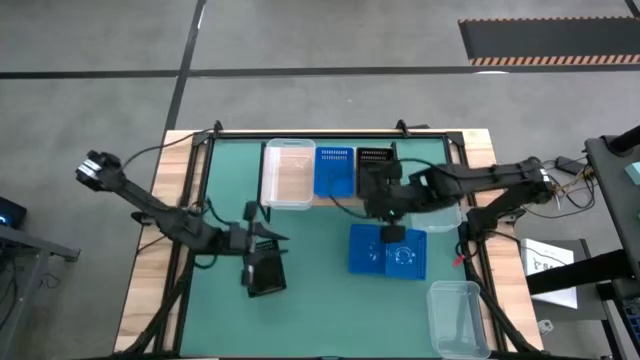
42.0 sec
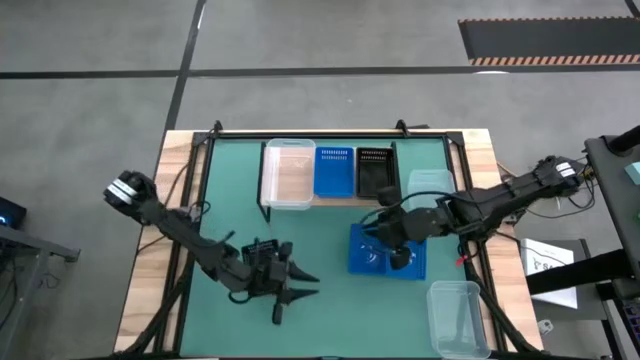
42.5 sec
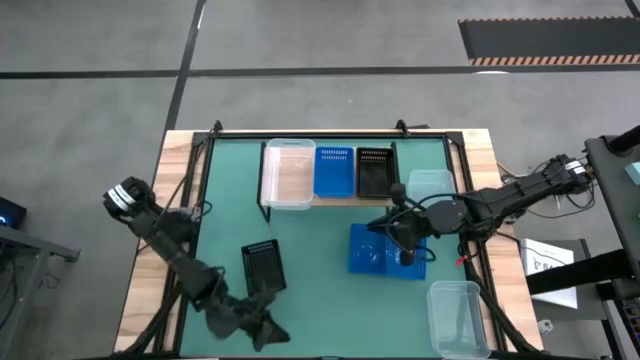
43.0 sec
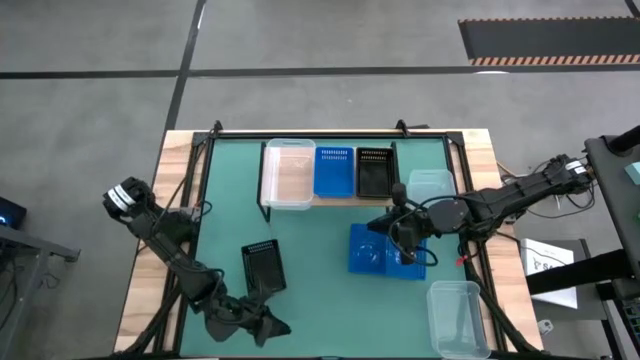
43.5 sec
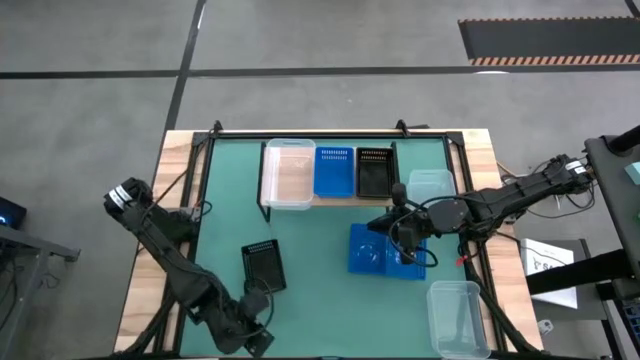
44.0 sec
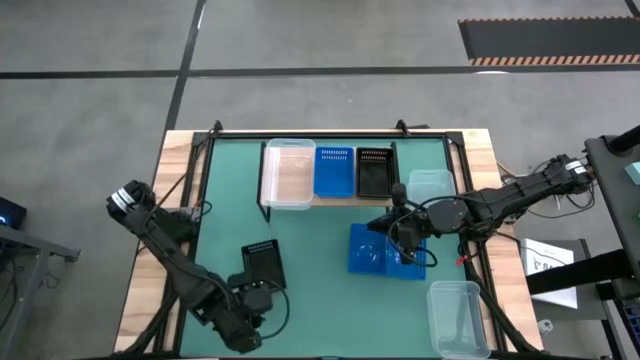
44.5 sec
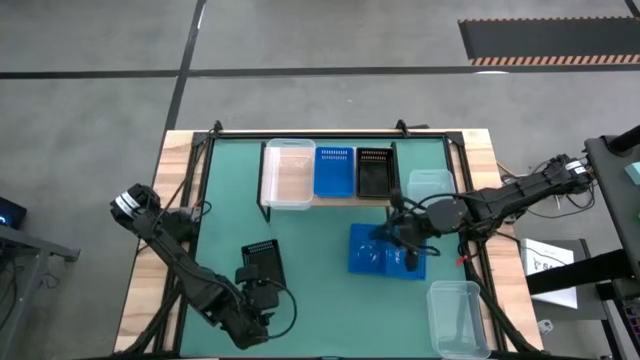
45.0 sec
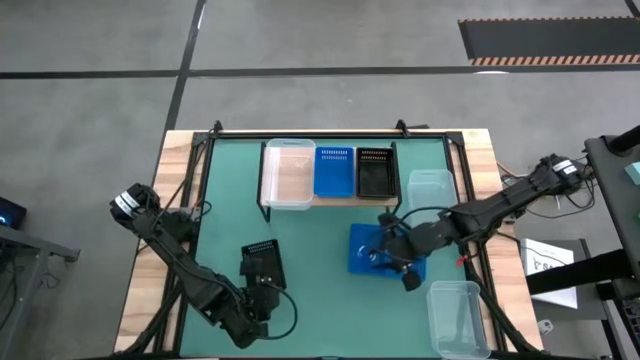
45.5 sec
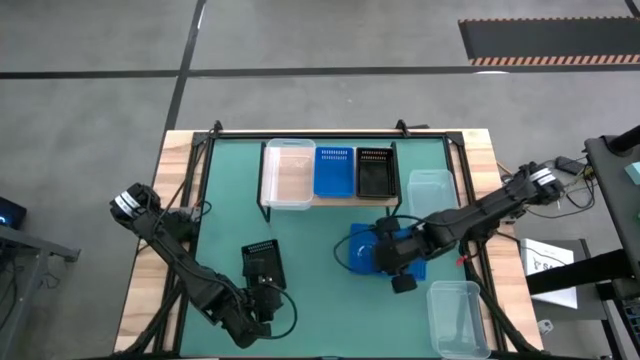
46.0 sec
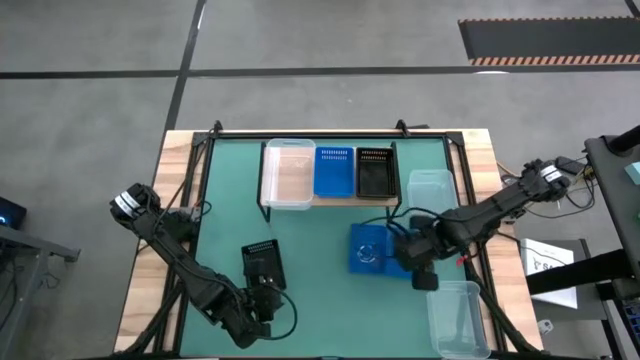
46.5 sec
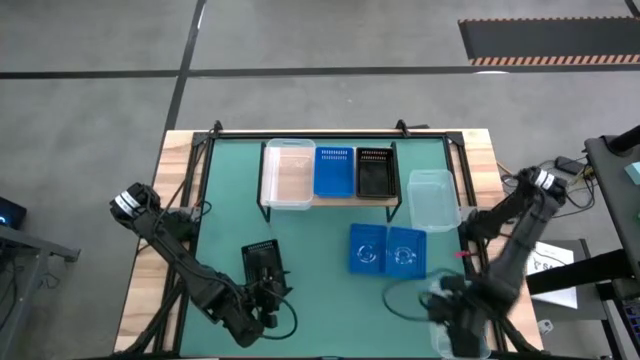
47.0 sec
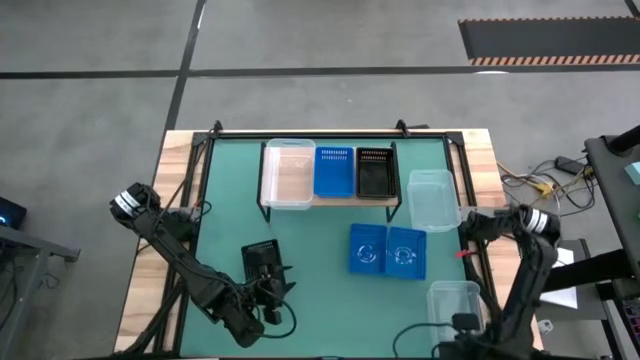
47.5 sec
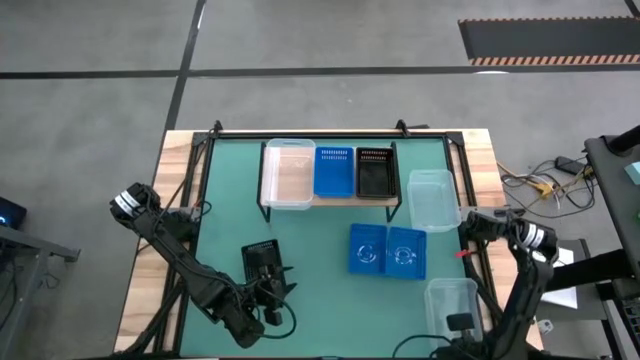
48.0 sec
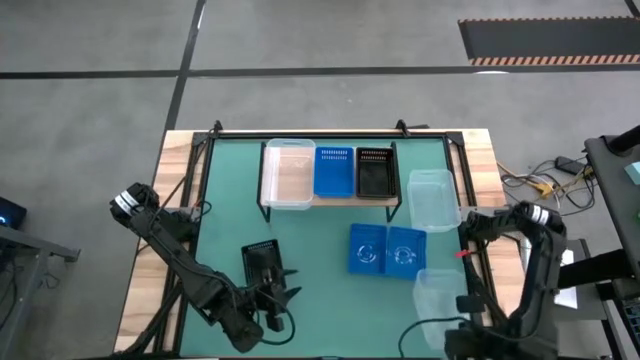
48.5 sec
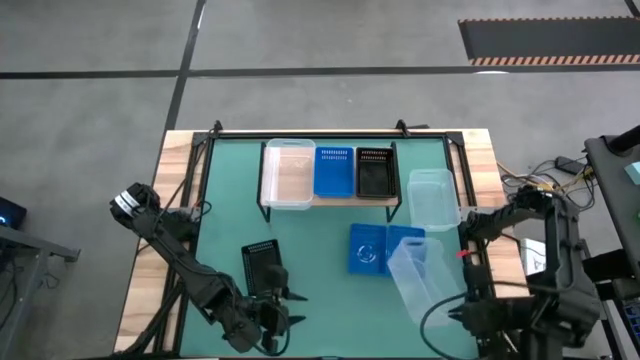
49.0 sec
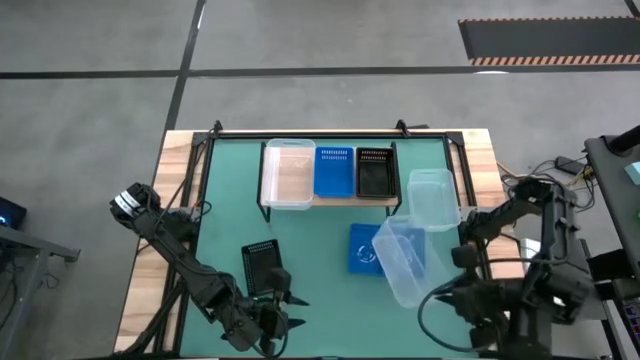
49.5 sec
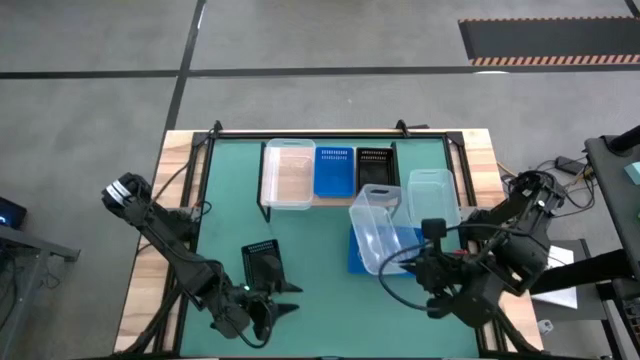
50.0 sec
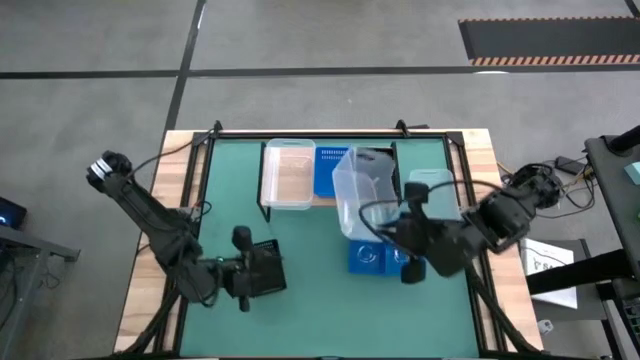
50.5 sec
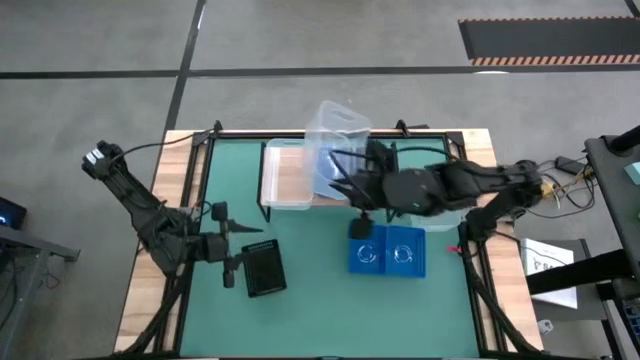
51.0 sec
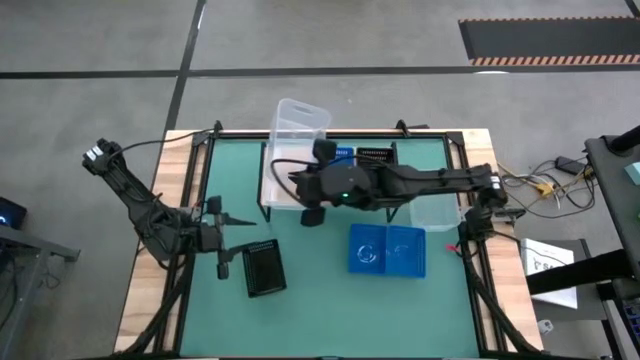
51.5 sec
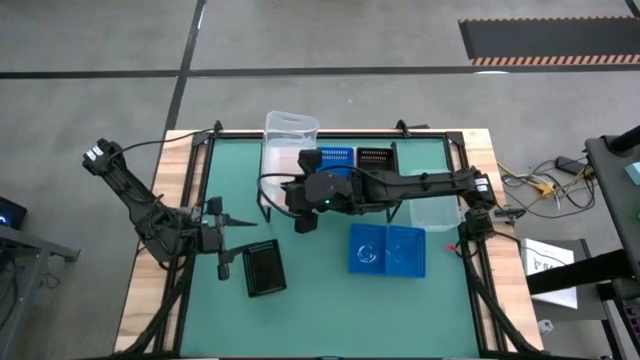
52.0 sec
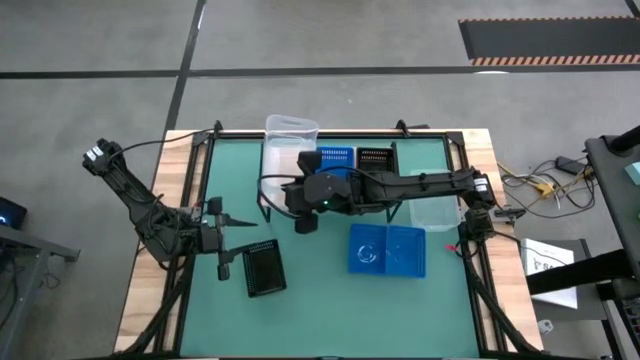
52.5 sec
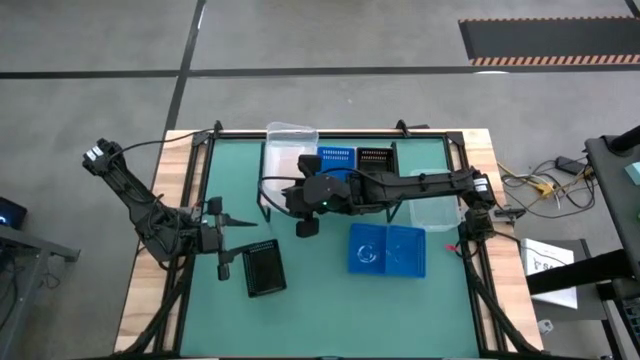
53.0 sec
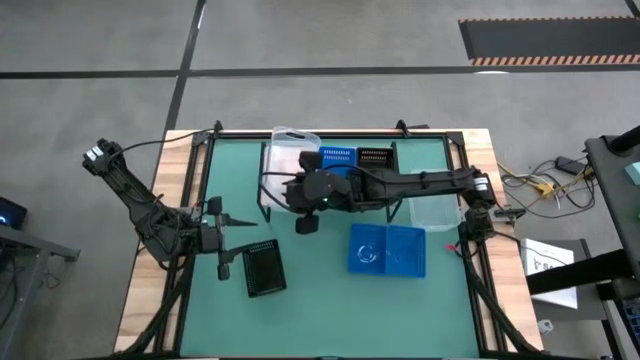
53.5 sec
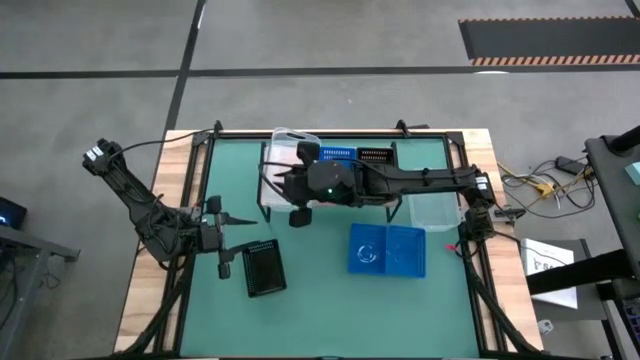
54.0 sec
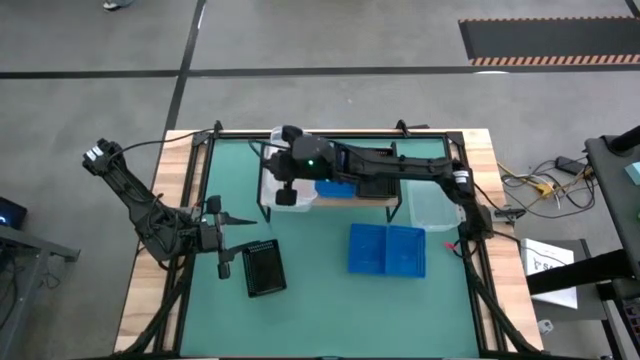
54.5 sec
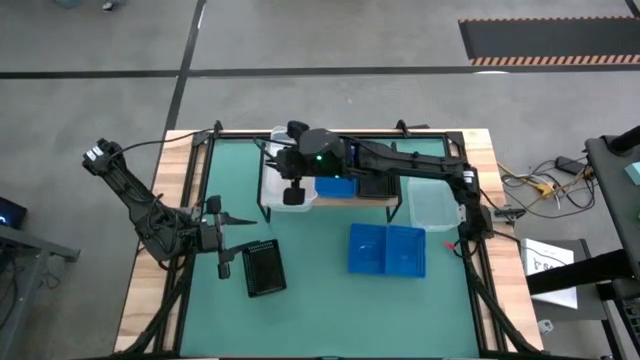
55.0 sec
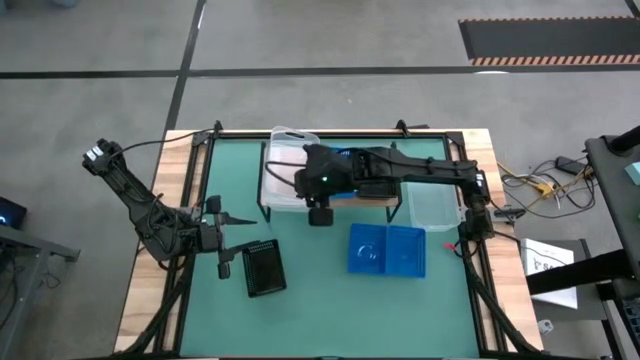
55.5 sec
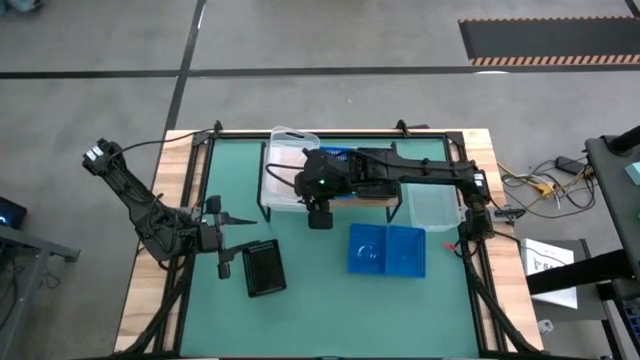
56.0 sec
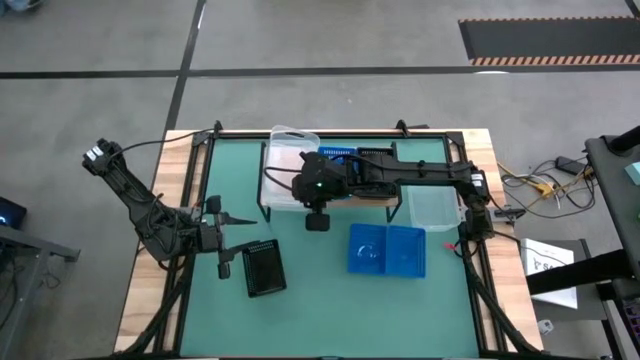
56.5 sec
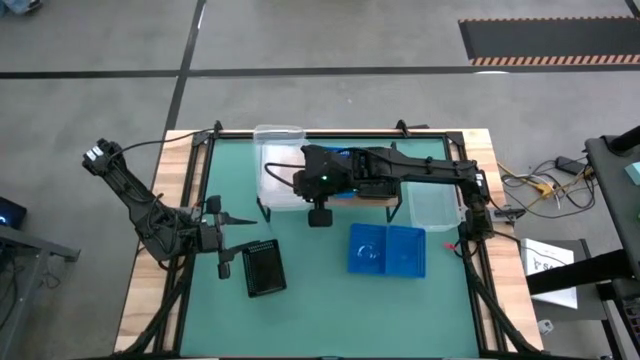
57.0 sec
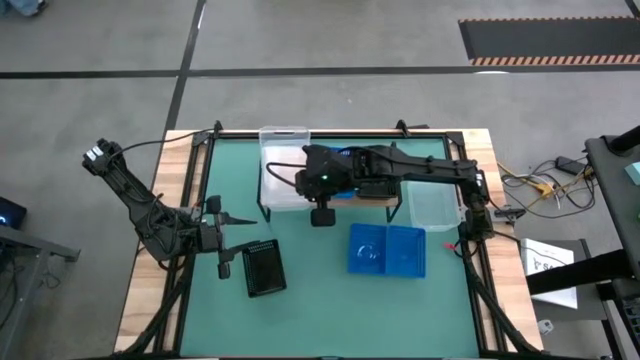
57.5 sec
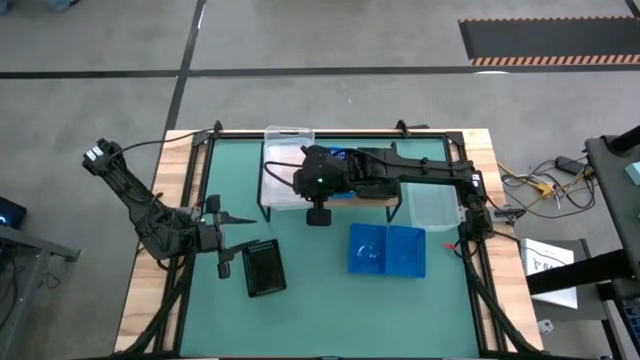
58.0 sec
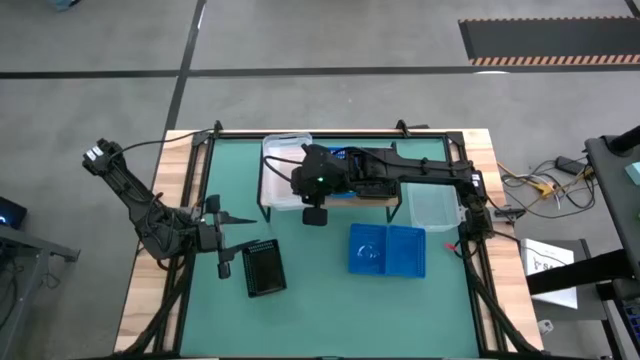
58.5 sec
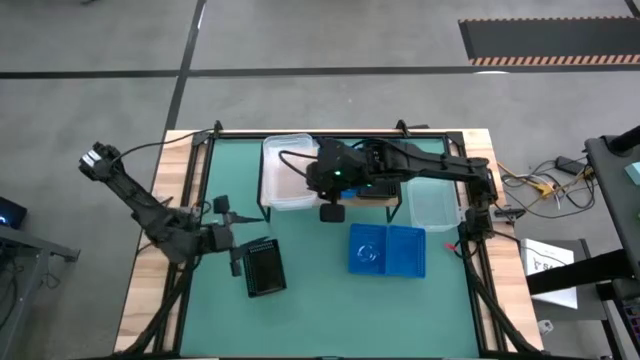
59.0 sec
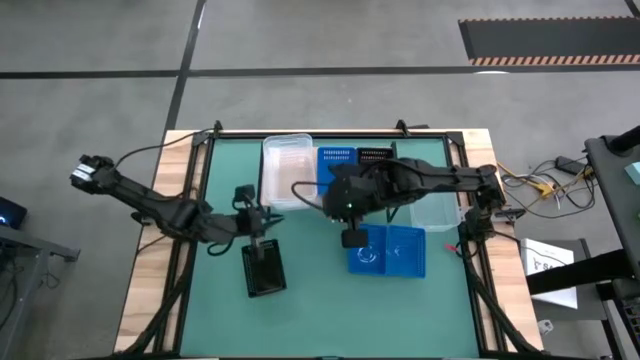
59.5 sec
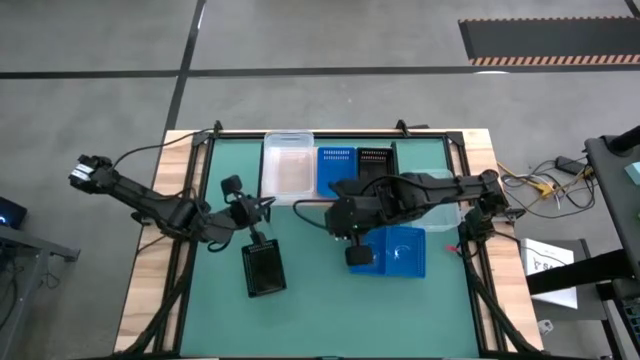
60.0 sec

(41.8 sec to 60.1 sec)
Task: Stack baskets on shelf by color
Stack the bottom transparent bin on top of the transparent bin on the shelf

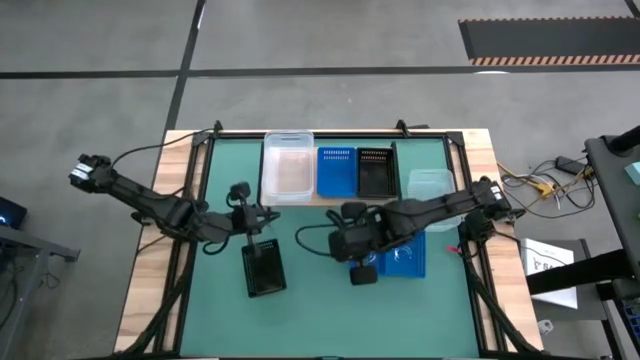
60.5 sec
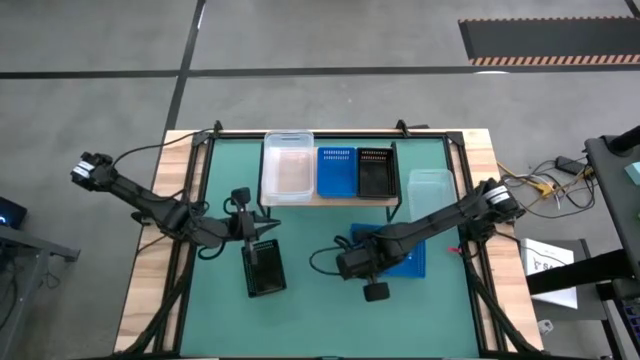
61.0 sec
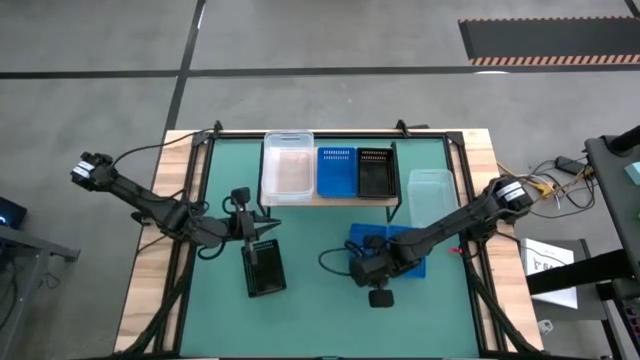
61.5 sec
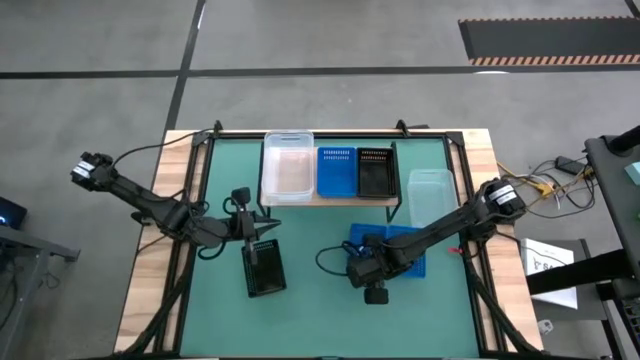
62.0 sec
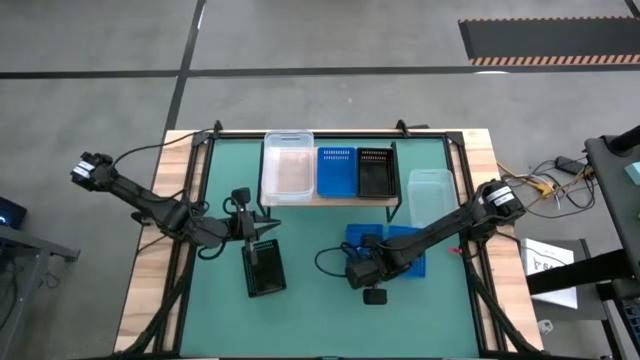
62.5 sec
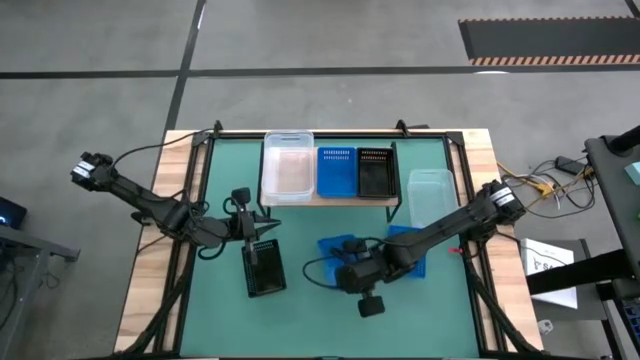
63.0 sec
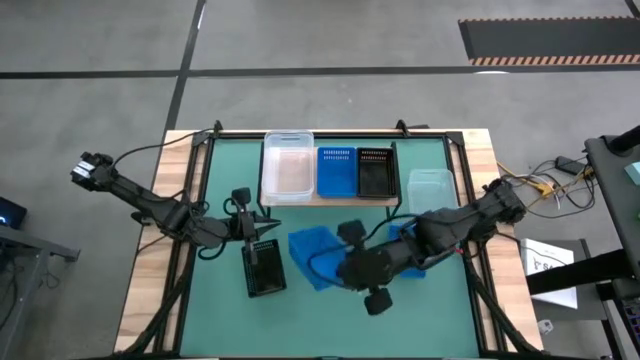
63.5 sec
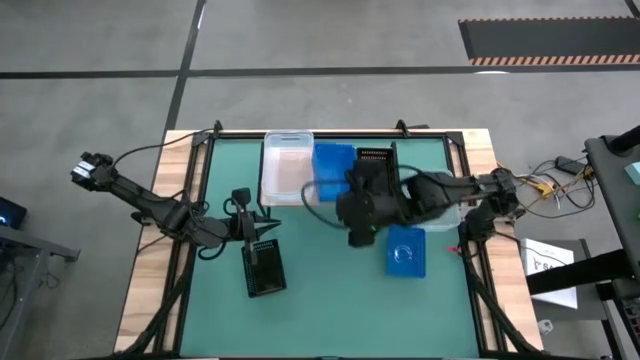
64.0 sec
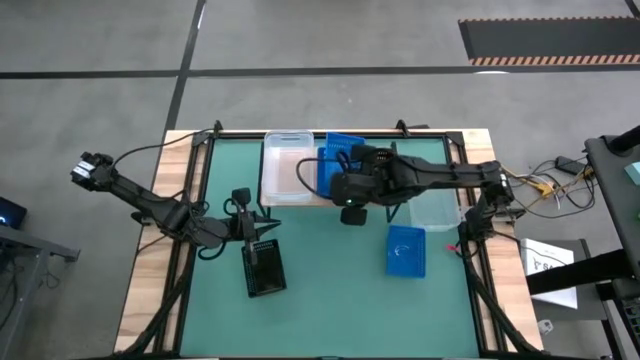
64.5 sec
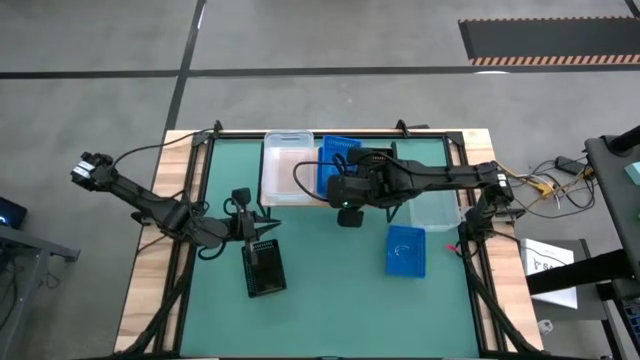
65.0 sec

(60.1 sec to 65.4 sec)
Stack the left blue bin on top of the blue bin on the shelf
